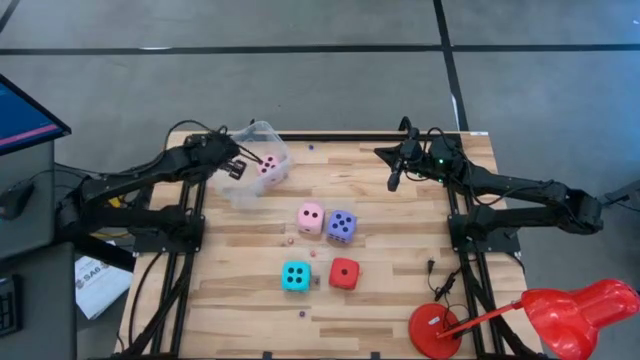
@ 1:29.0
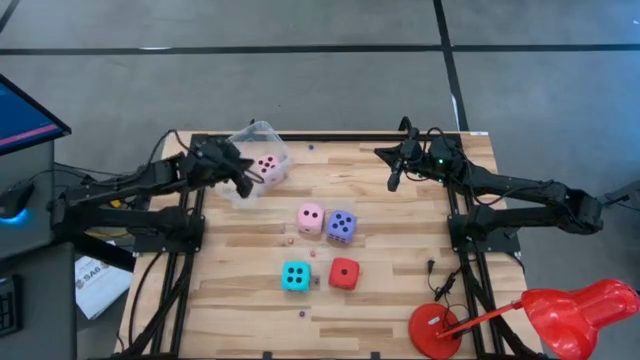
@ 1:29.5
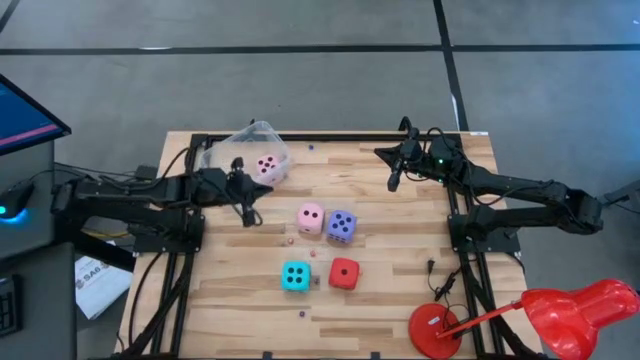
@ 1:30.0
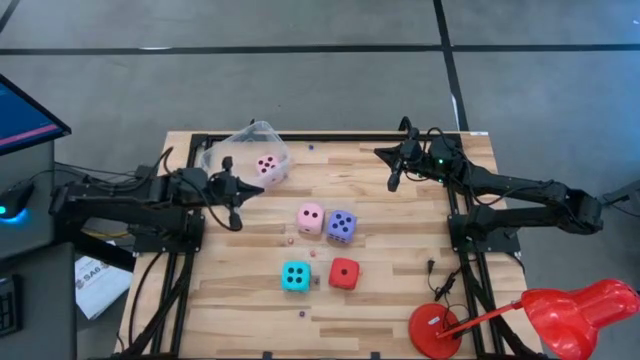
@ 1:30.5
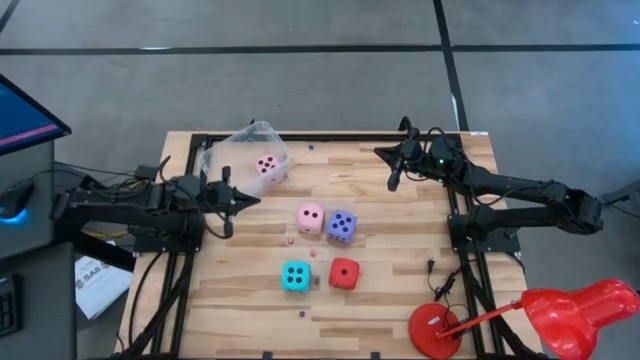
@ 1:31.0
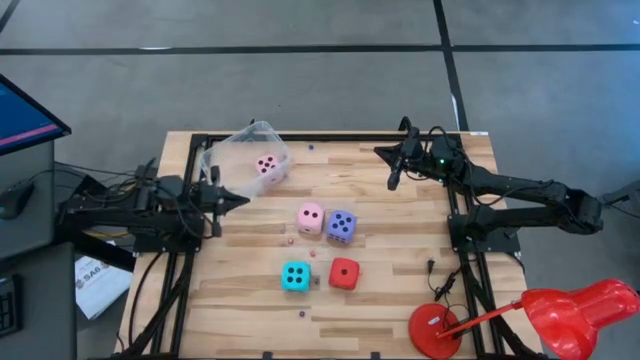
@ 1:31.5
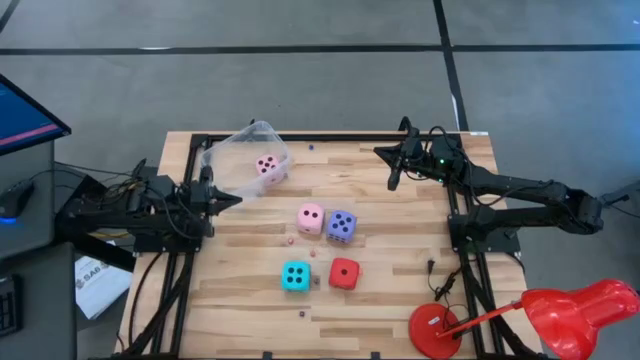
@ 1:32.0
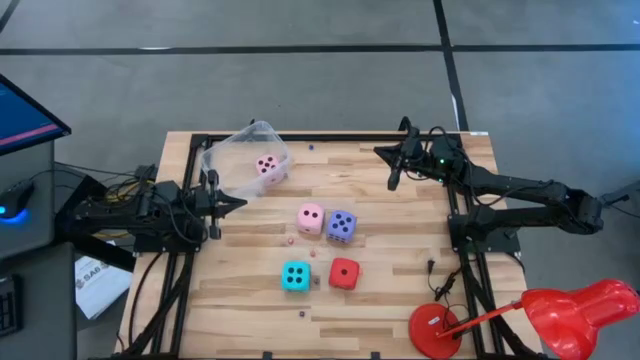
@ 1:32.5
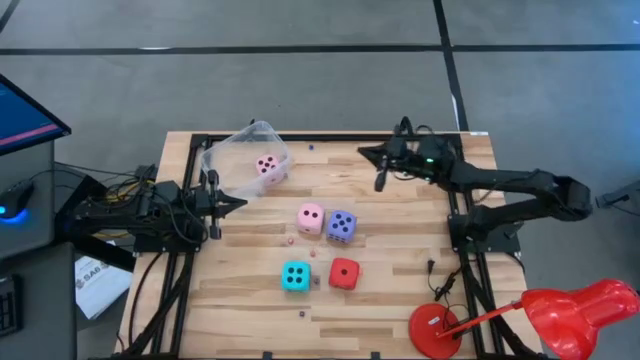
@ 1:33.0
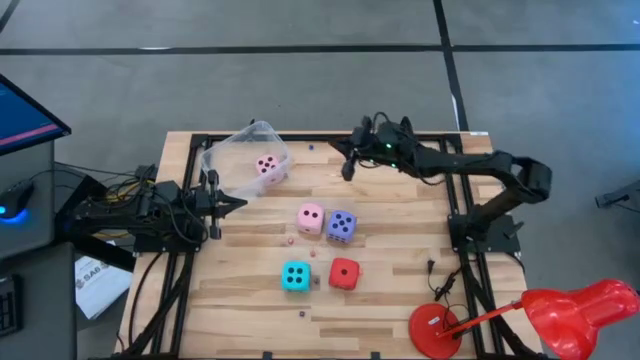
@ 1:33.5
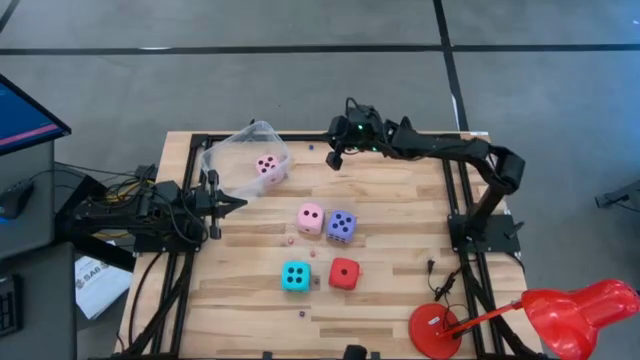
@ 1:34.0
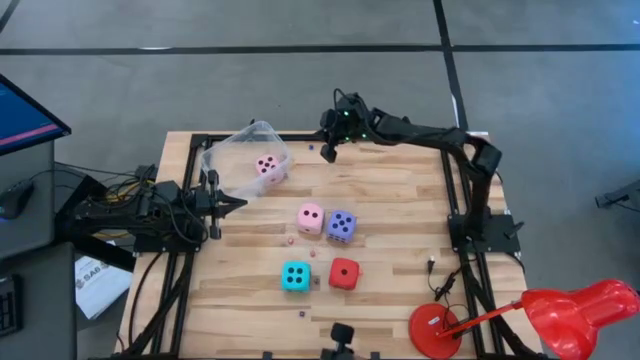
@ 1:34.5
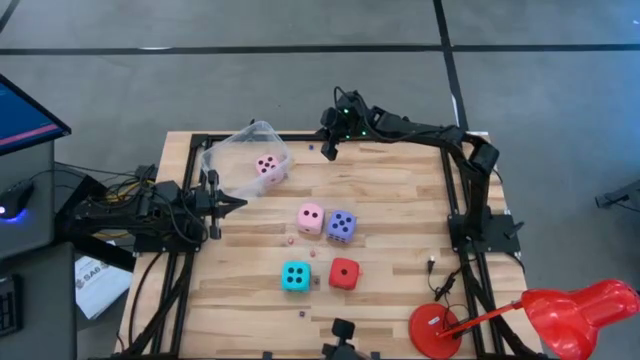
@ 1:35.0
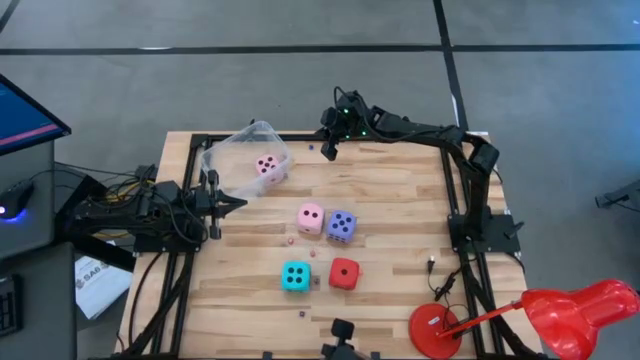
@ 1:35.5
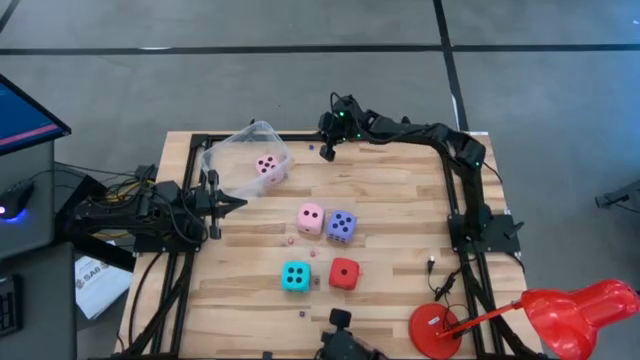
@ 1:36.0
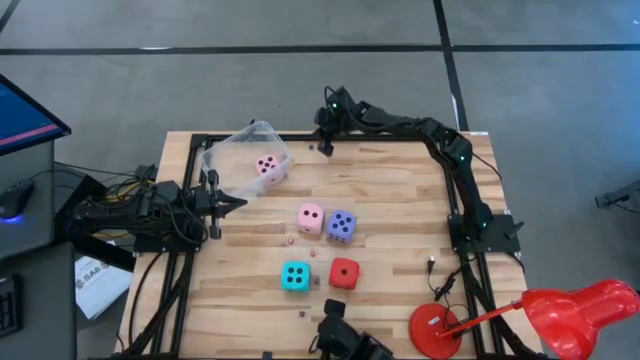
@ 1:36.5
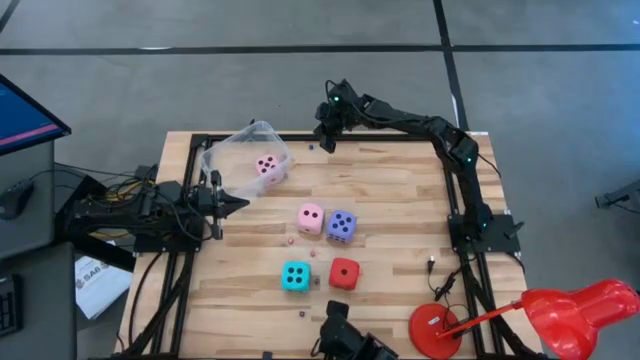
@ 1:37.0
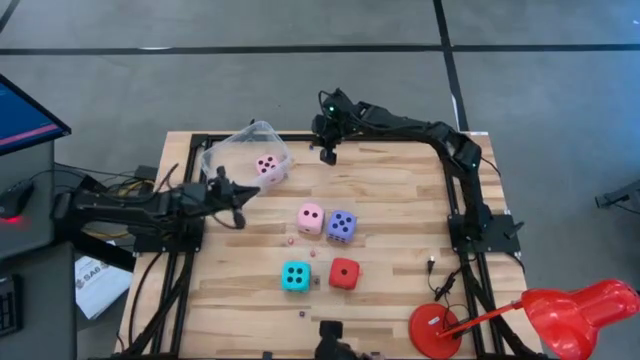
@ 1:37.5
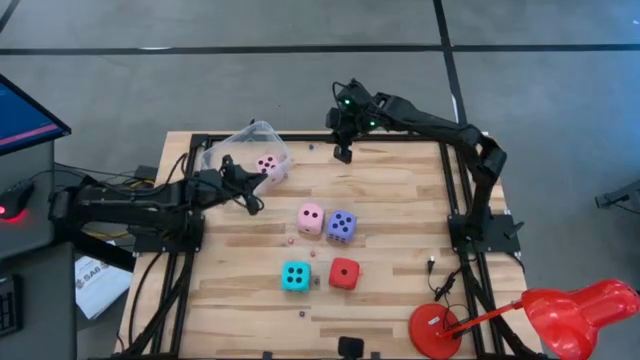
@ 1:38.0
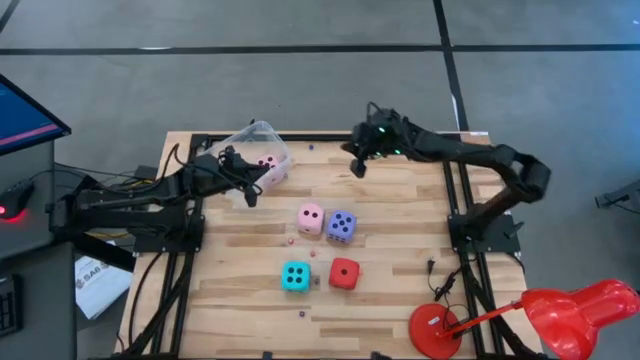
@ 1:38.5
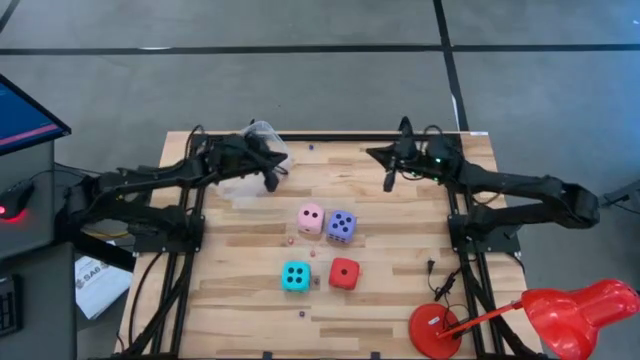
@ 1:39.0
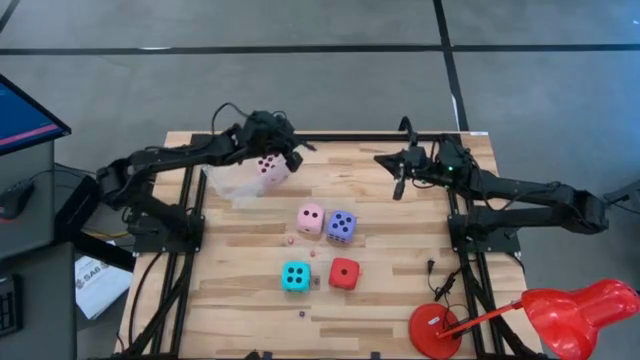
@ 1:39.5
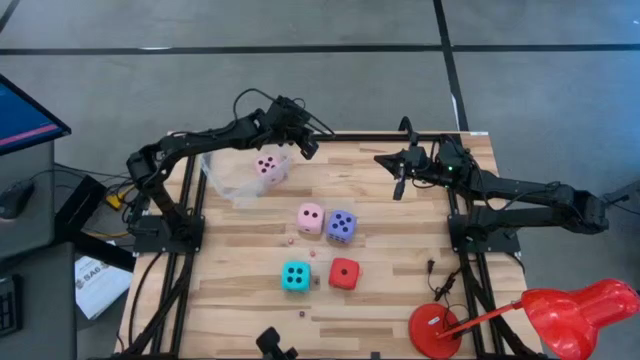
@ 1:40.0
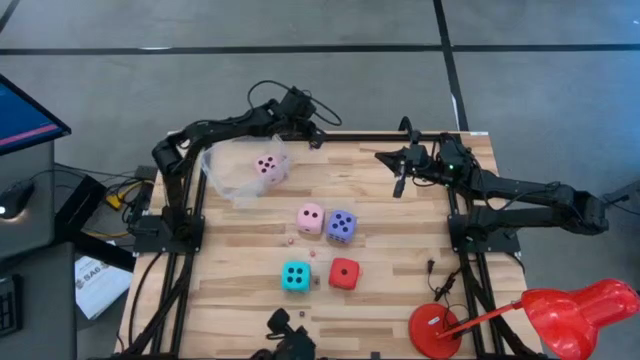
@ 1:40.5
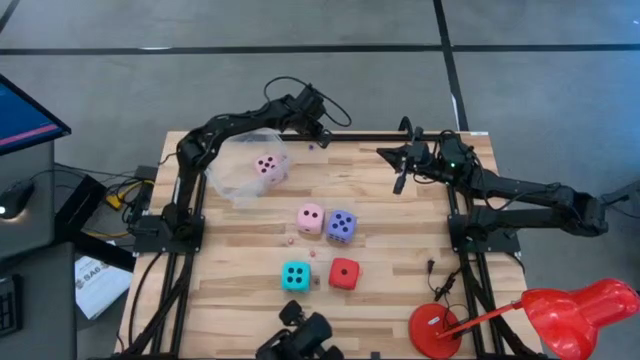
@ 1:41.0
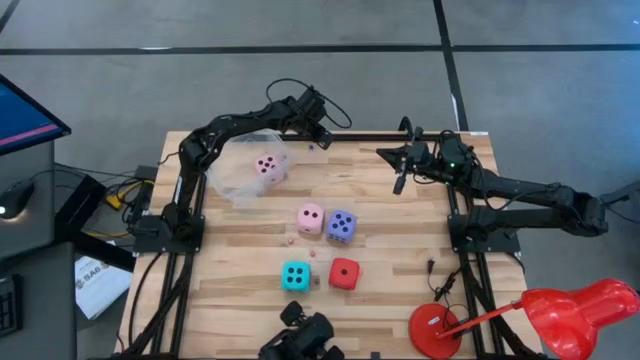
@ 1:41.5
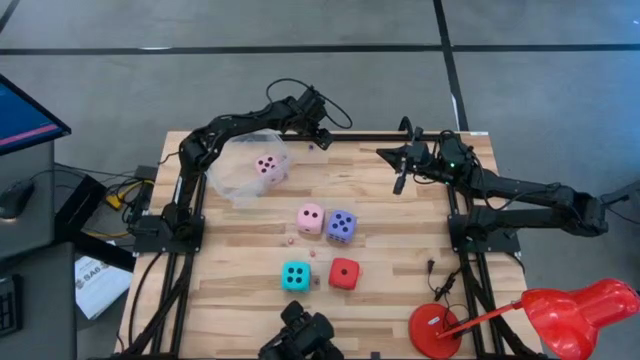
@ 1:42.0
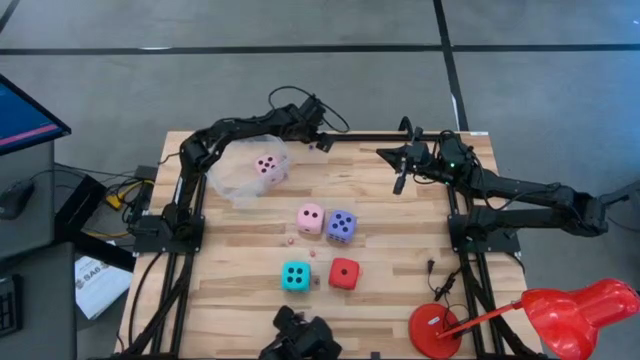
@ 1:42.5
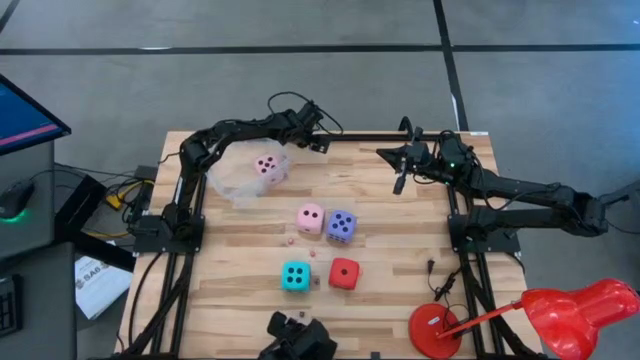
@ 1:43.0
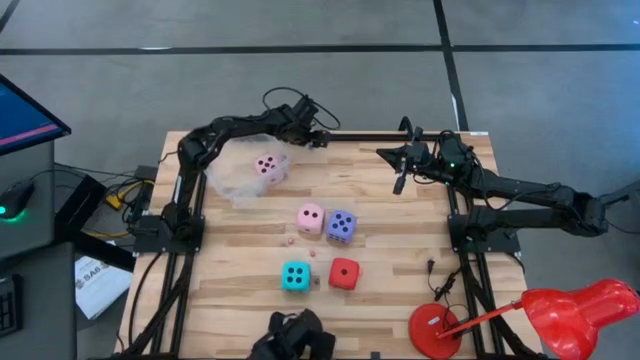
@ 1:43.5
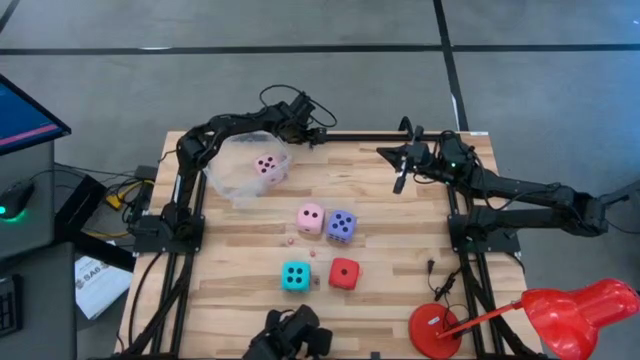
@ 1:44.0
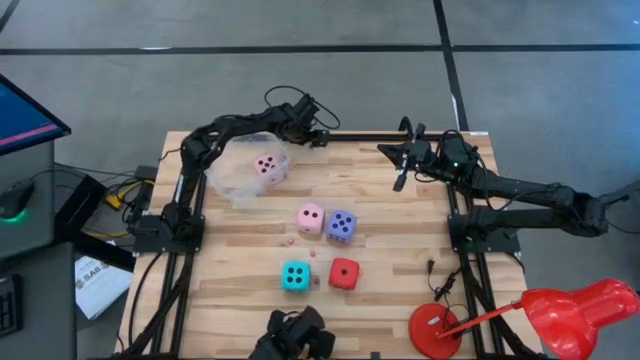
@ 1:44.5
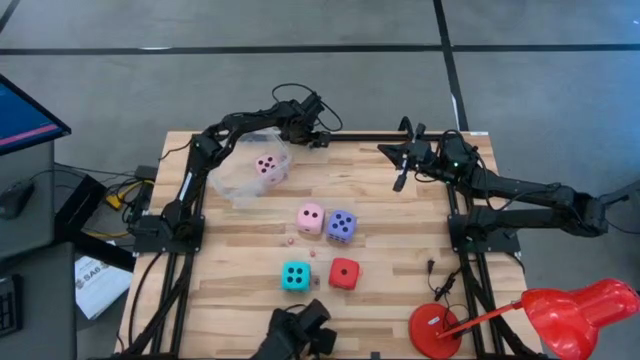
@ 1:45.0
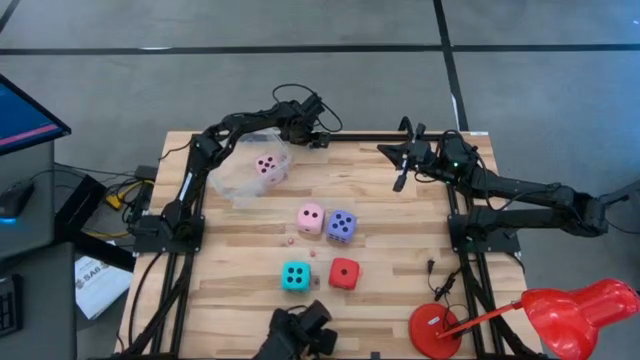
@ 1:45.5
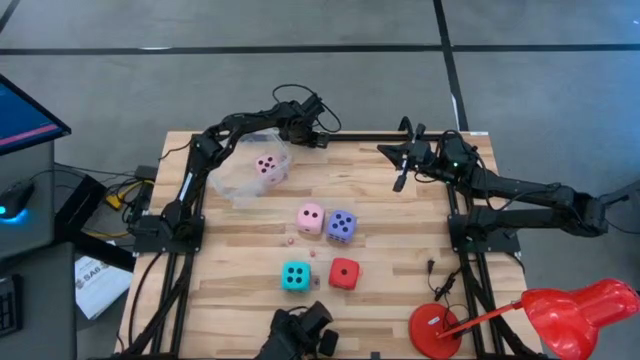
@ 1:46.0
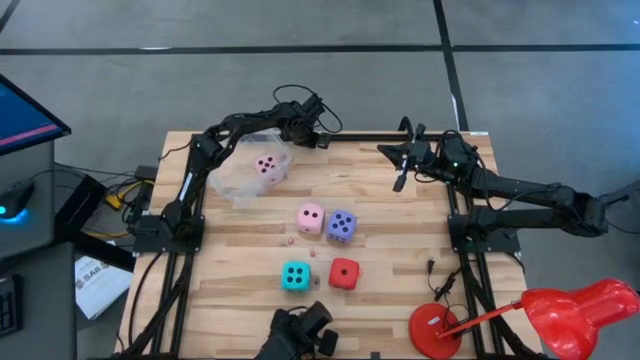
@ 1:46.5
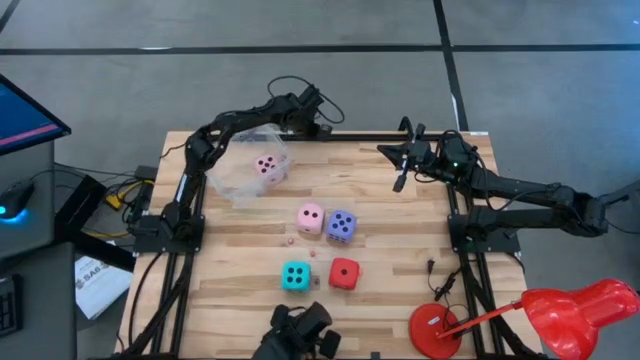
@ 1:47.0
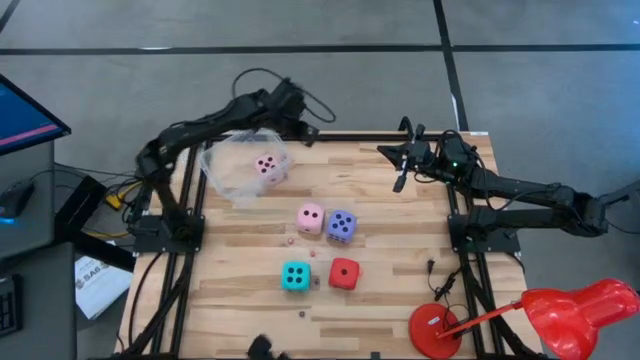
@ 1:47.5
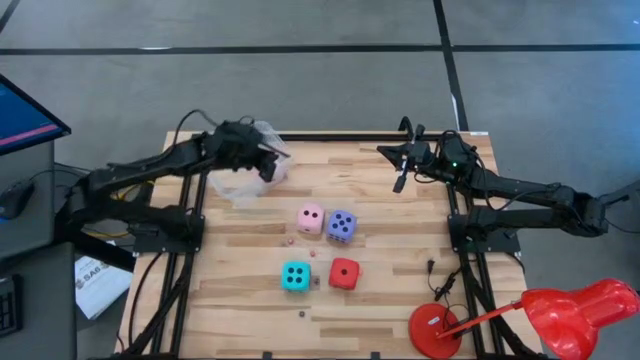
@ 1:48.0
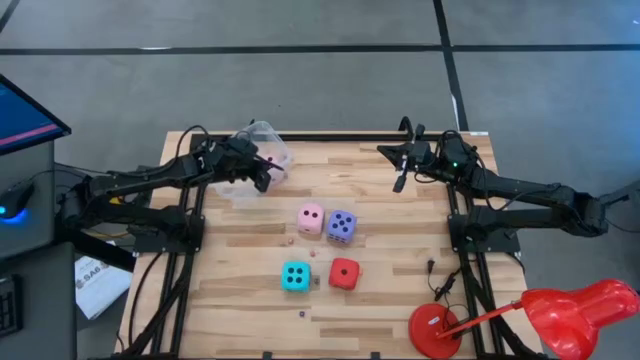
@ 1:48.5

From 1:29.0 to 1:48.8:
Task: Pick & Place Dice
Put the small blue dice into the transparent container

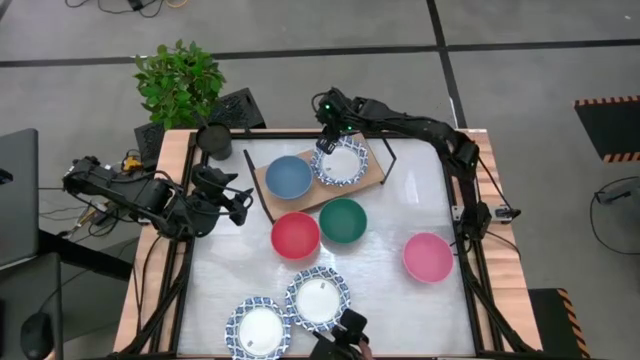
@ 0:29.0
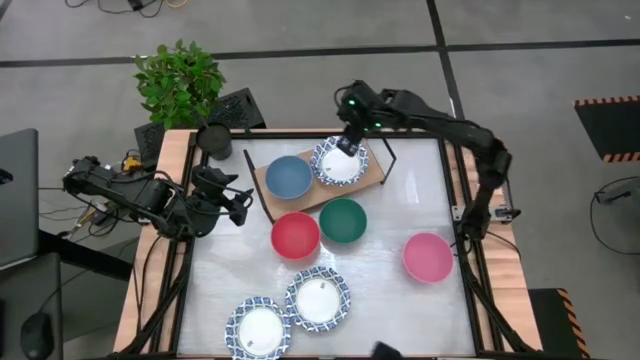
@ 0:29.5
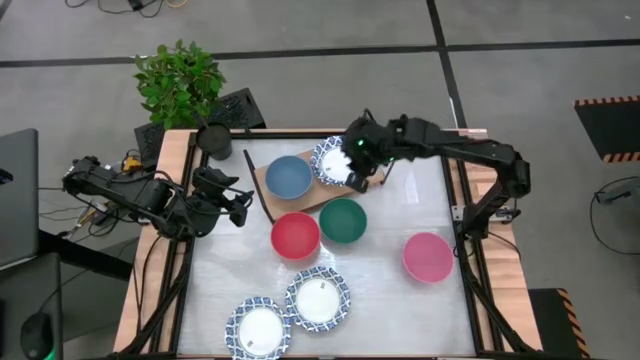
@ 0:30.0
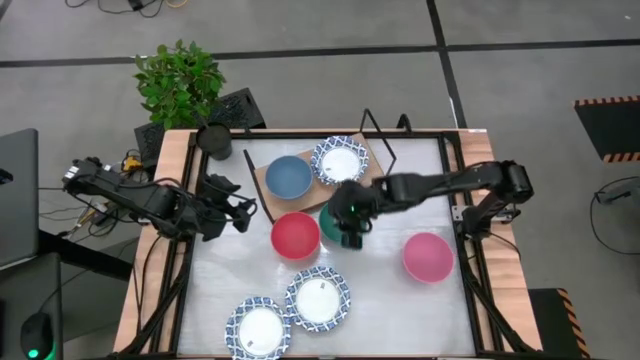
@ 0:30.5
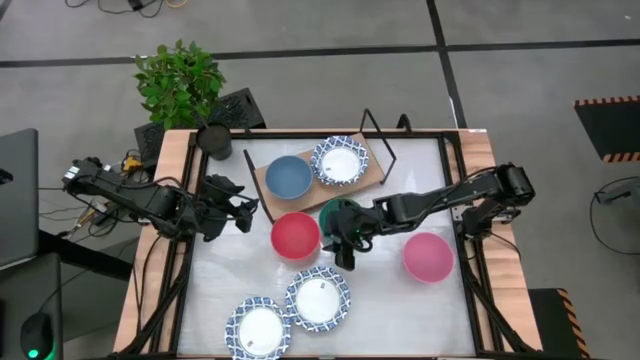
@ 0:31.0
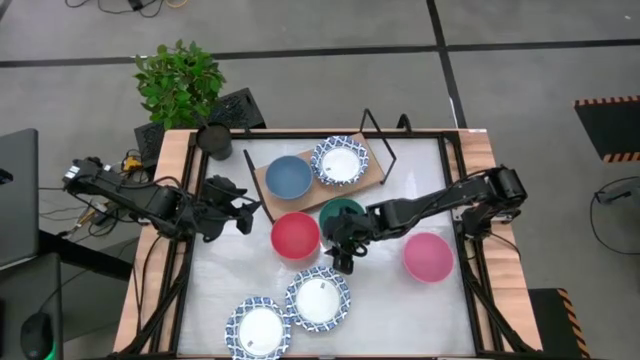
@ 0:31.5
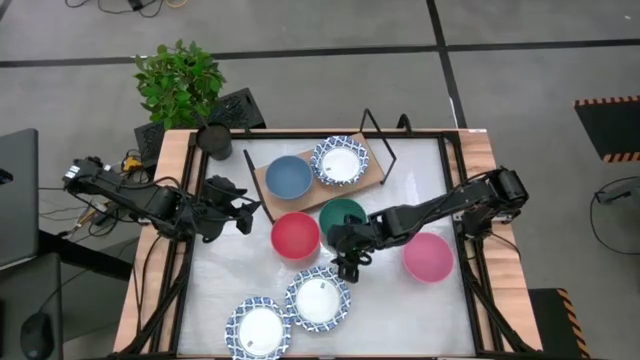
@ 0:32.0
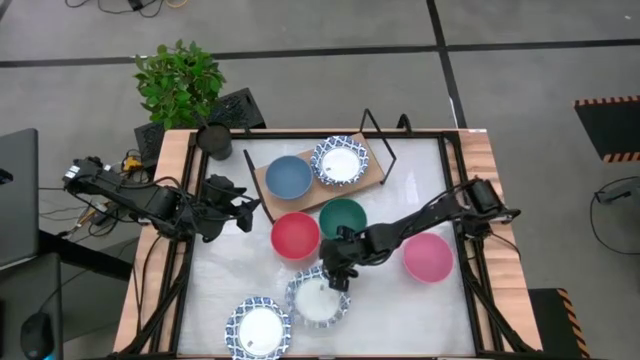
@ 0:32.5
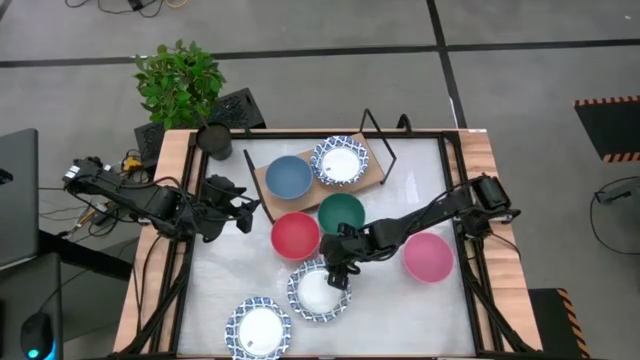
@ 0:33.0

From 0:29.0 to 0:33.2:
Task: Place and stack bowls onto a shelf
Stack the white patterned bowl on top of the white patterned bowl on the shelf
